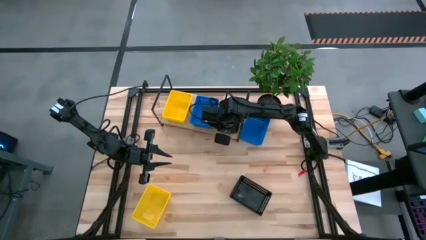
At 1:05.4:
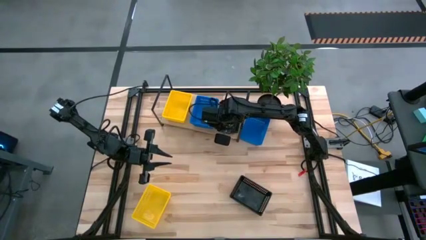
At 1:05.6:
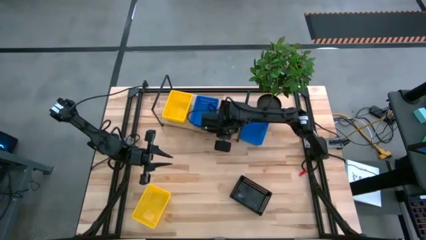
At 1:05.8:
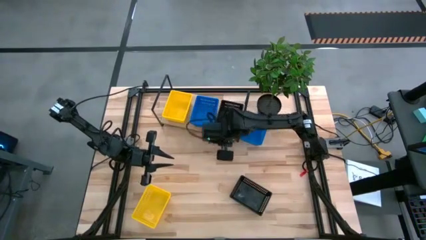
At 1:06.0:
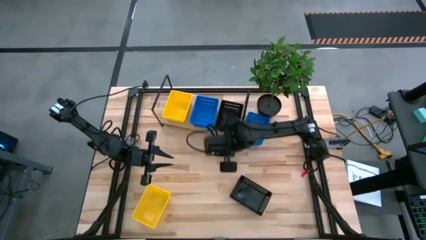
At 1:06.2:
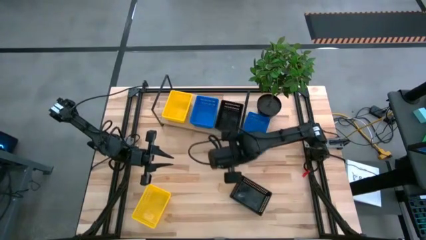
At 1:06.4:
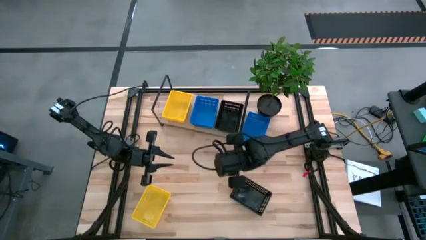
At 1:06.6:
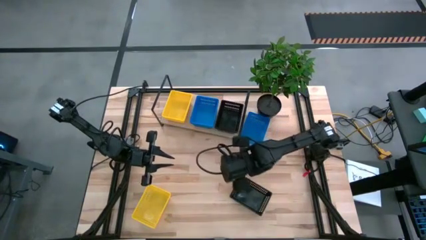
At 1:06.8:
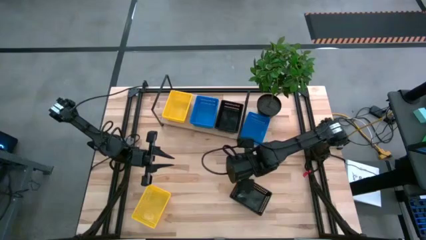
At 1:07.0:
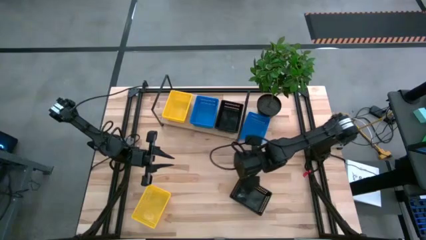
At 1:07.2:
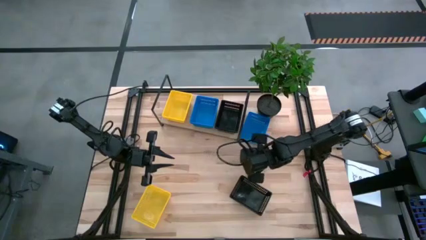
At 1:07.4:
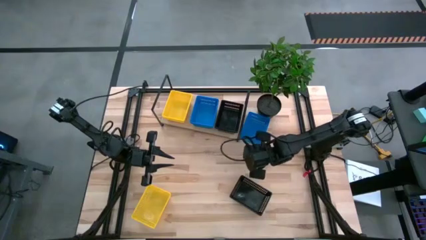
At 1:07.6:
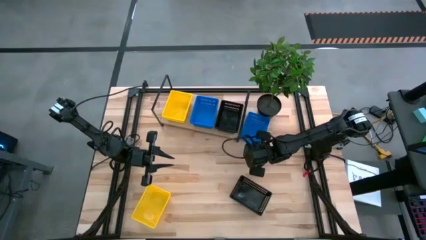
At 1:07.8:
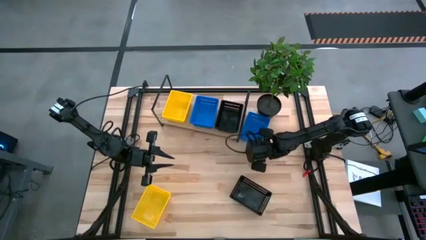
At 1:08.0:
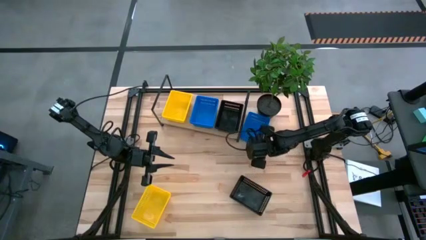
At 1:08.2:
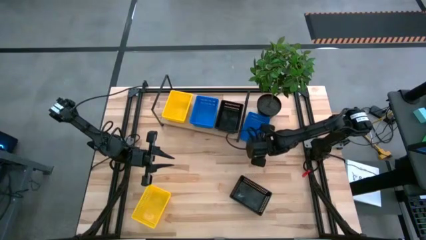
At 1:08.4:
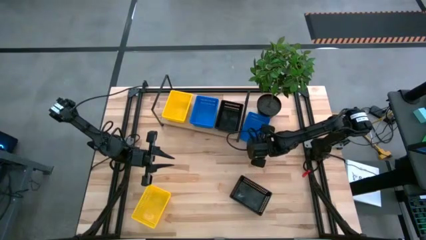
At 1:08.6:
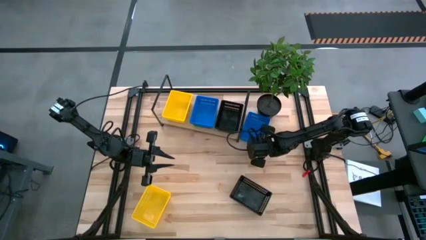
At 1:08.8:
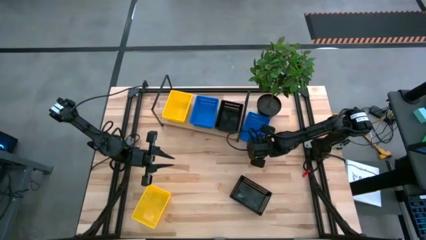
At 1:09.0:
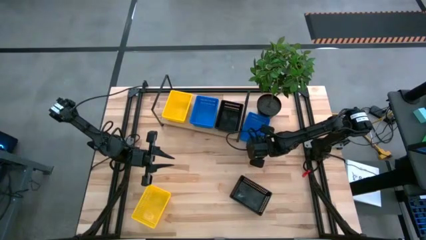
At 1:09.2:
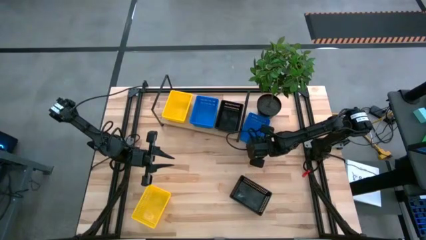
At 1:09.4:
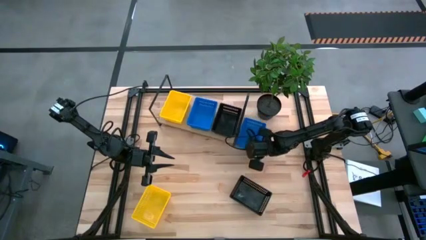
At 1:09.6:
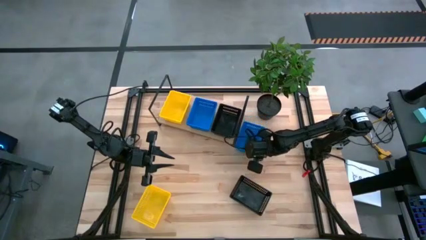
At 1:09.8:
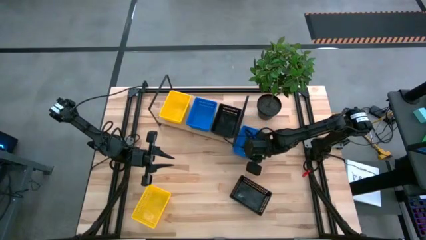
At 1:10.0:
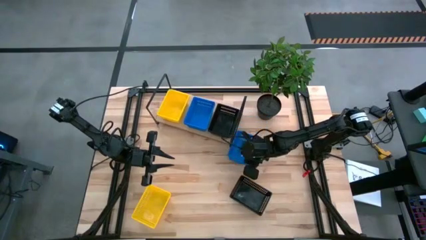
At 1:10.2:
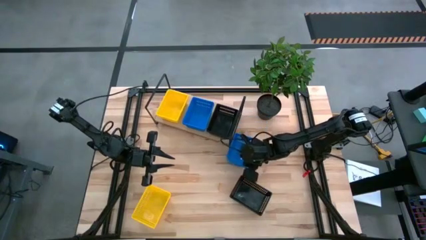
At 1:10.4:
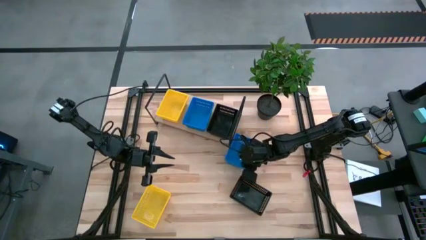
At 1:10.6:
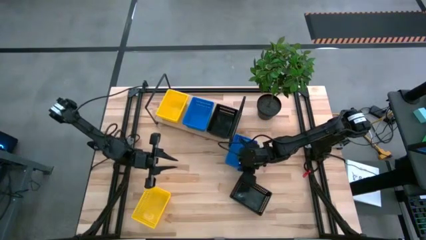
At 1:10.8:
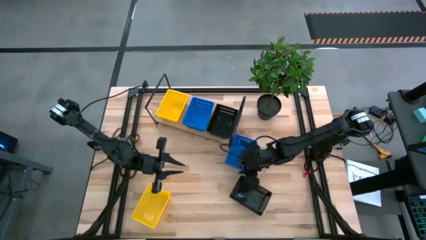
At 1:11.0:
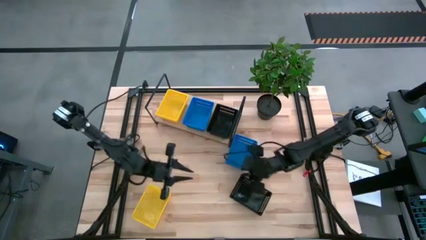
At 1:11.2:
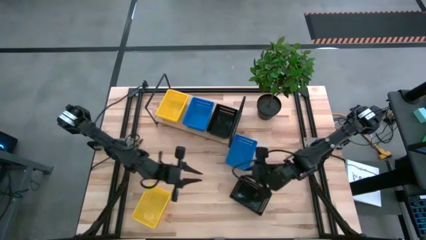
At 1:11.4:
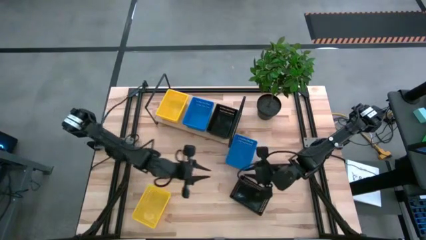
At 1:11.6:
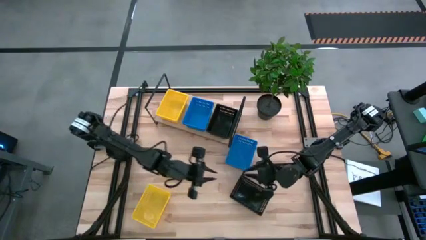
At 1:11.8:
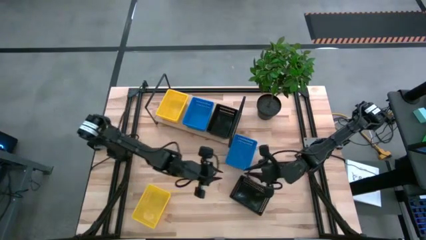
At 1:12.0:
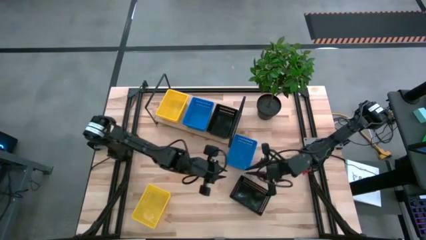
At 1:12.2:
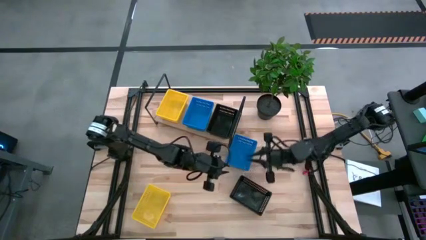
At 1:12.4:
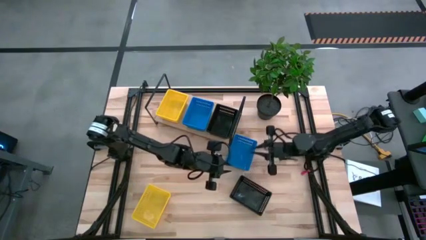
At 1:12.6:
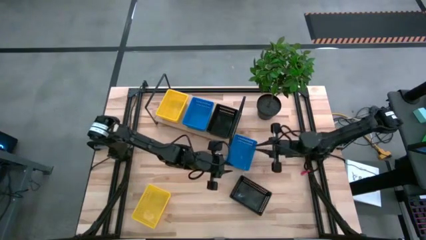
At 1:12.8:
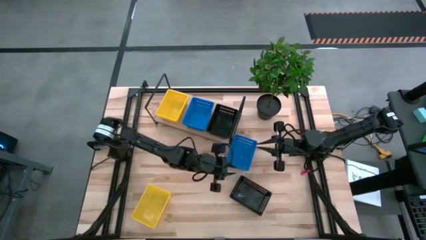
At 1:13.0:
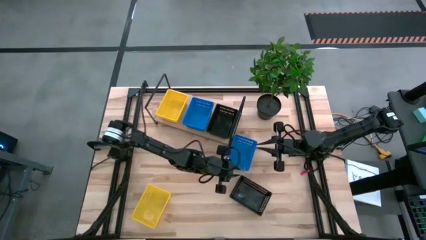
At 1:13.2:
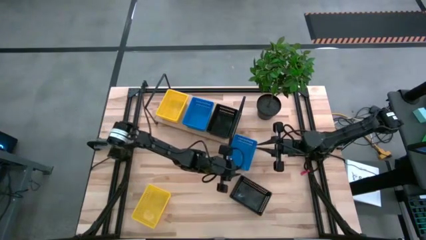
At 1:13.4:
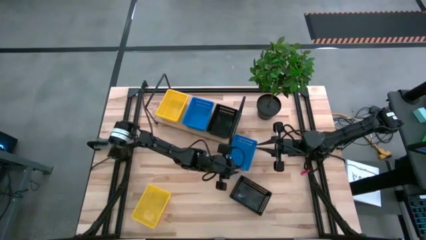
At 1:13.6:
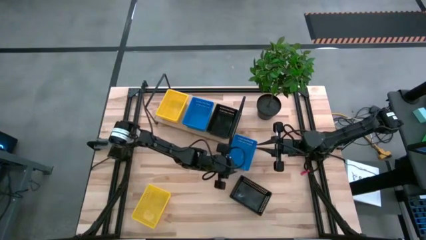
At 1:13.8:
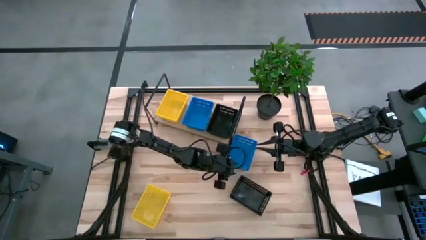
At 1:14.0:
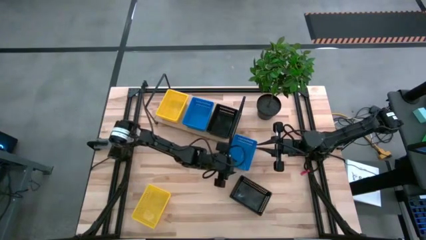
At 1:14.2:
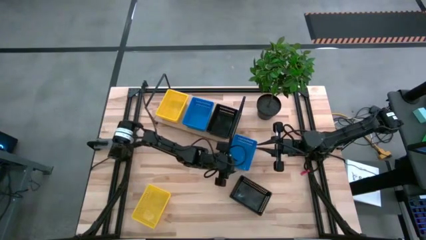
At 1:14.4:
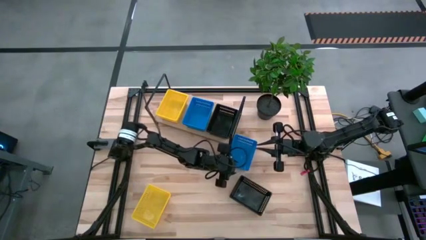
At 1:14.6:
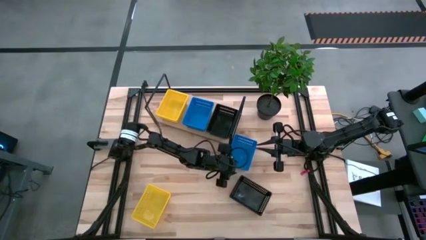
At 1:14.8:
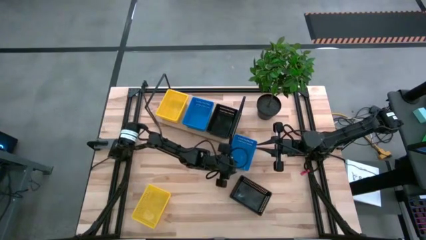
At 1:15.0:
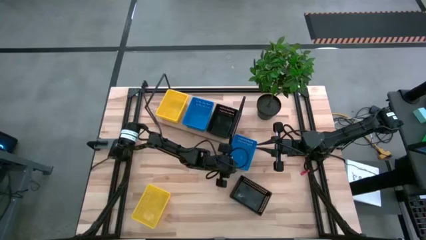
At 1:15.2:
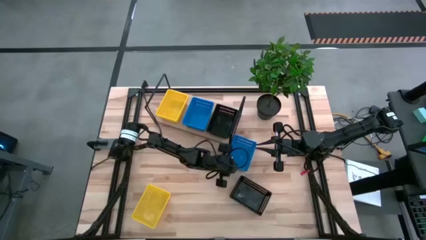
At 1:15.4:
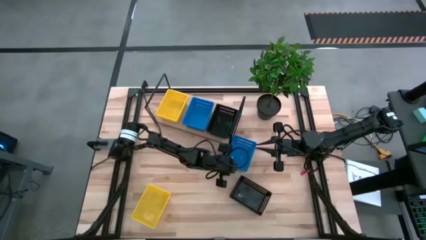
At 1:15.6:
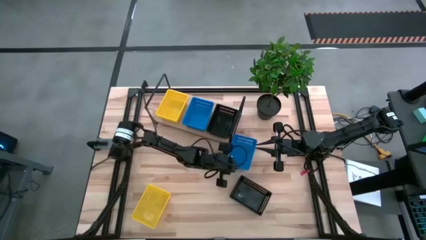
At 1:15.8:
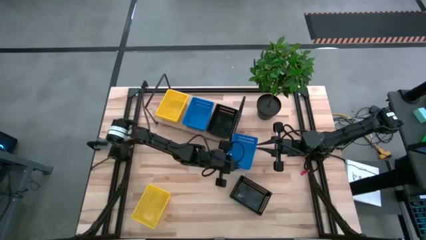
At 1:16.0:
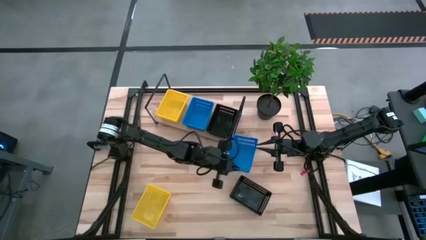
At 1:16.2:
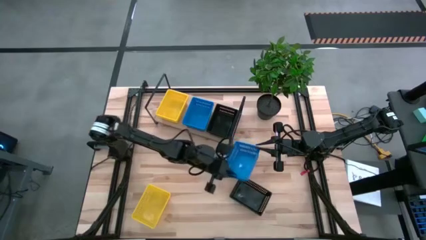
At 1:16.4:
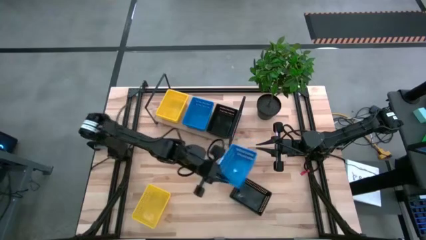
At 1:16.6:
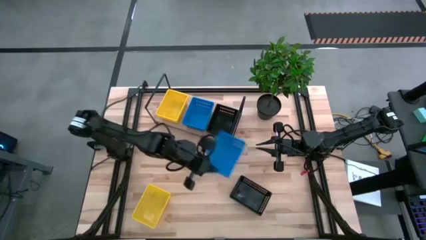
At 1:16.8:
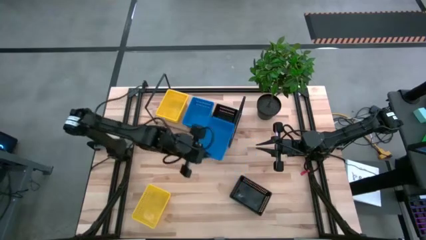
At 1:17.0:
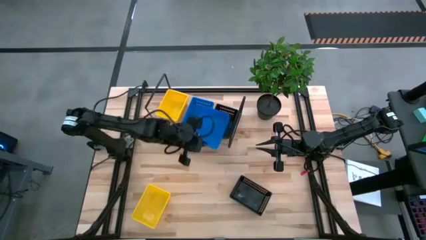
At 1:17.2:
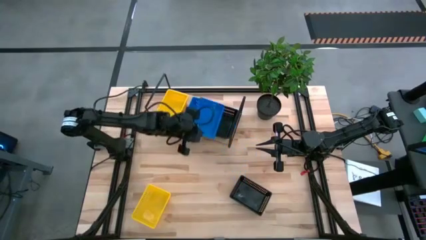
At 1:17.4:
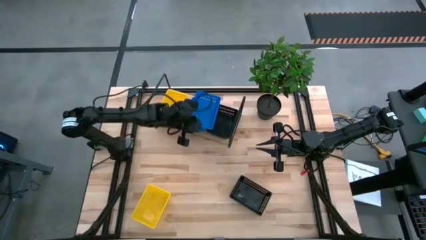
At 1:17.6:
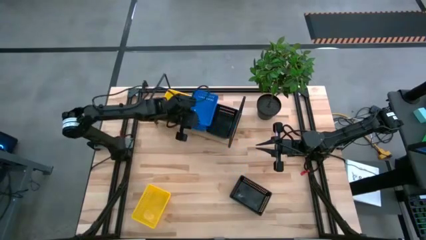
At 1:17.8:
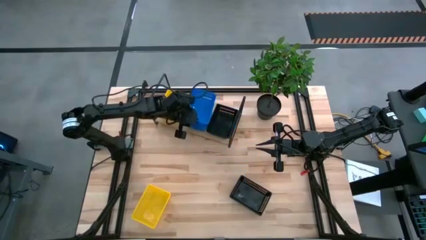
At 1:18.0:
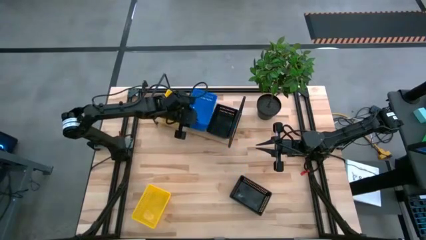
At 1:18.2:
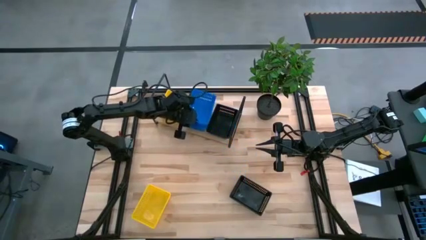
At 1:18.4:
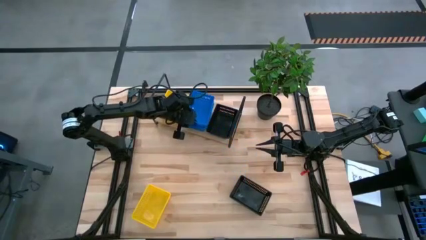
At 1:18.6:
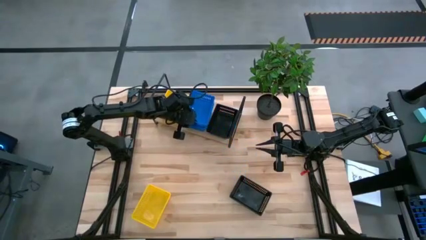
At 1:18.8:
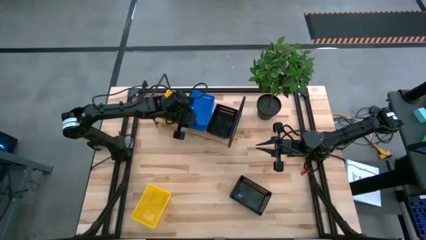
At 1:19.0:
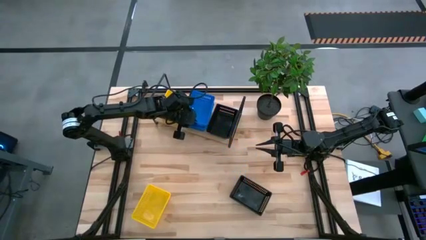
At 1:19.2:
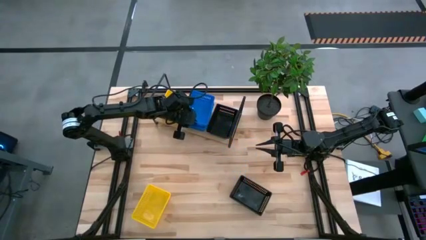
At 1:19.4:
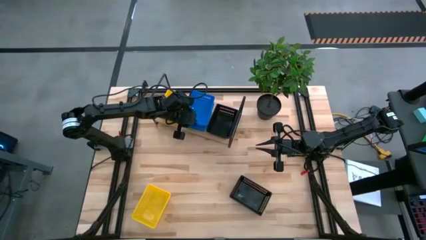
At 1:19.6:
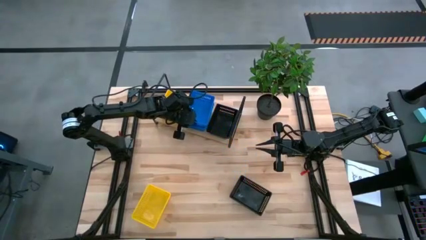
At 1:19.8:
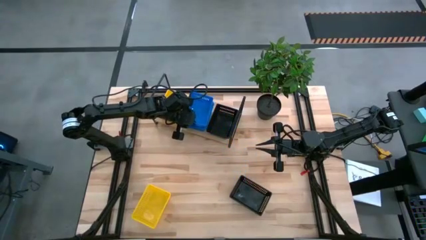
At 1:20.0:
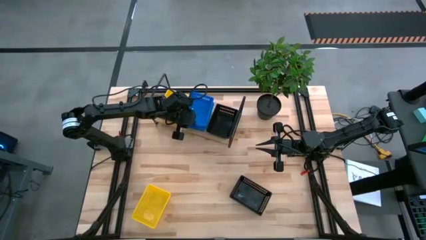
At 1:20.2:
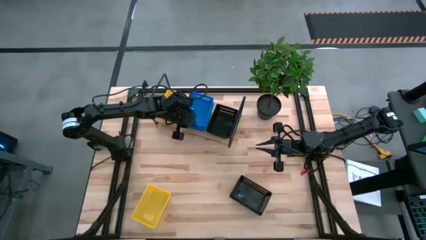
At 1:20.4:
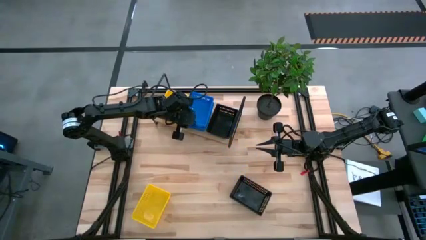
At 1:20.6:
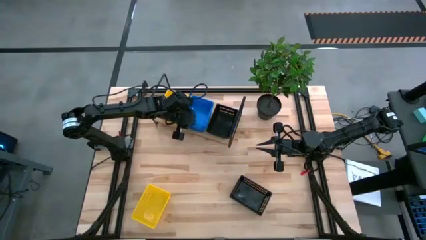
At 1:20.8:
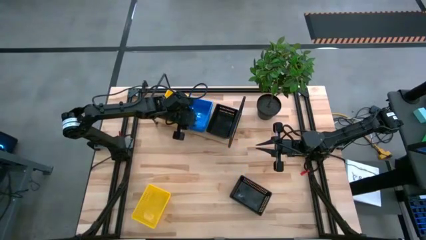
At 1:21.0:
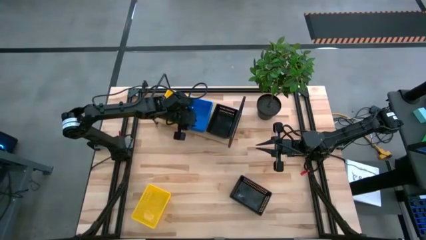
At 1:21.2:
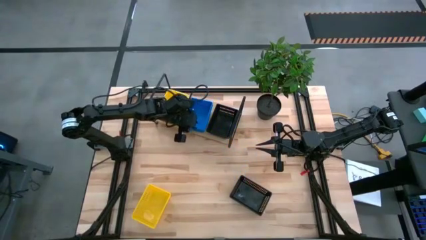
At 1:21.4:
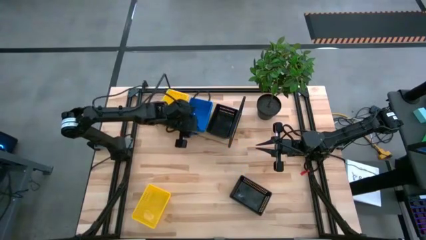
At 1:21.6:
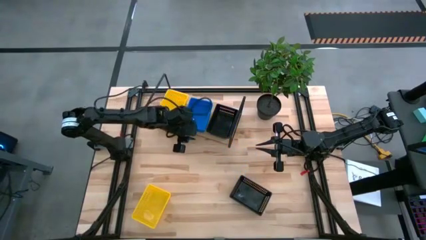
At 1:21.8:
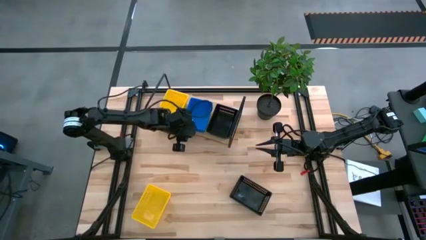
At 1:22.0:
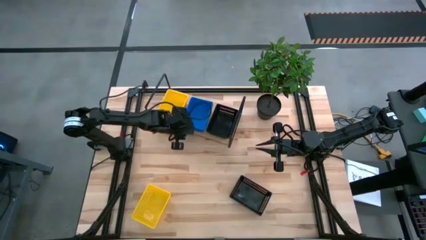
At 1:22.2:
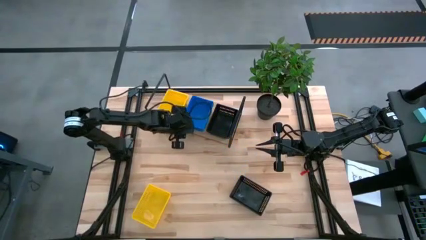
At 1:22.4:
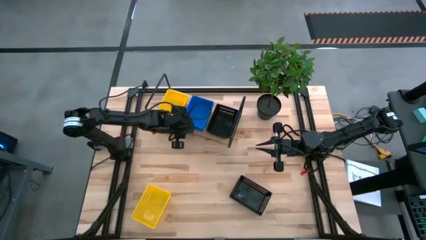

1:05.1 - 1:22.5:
Task: Stack baskets on shelf by color
Stack the blue basket on top of the other blue baskets on the shelf
